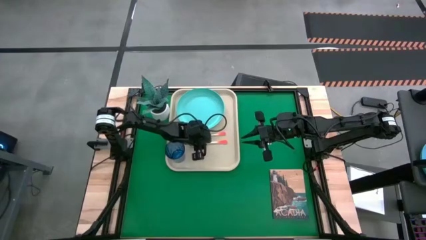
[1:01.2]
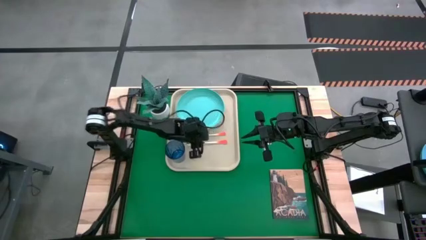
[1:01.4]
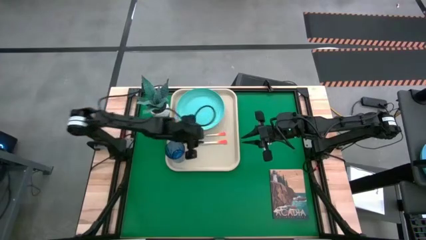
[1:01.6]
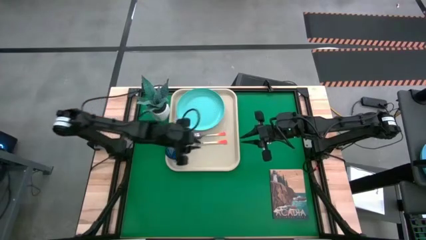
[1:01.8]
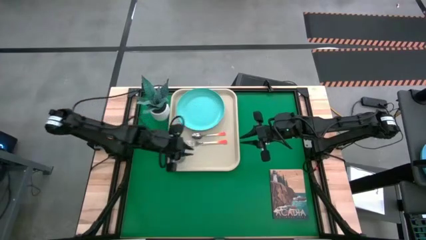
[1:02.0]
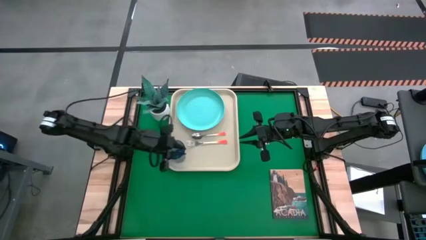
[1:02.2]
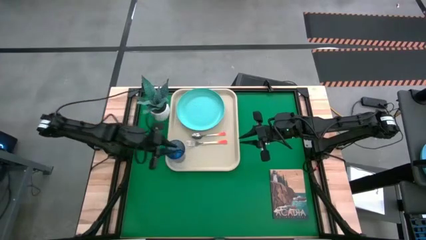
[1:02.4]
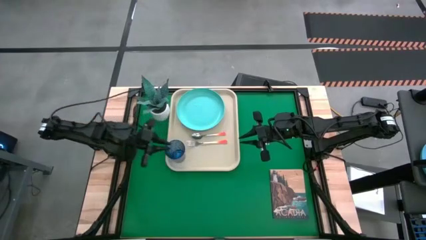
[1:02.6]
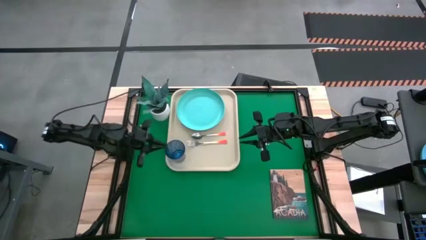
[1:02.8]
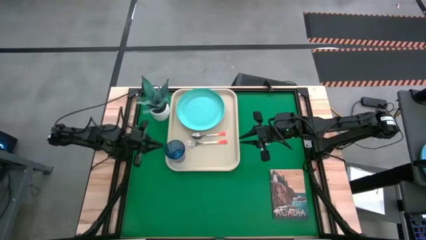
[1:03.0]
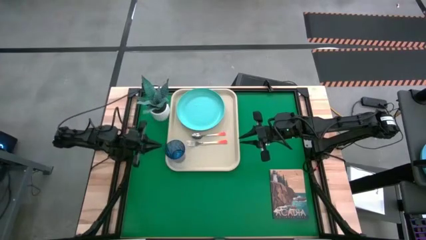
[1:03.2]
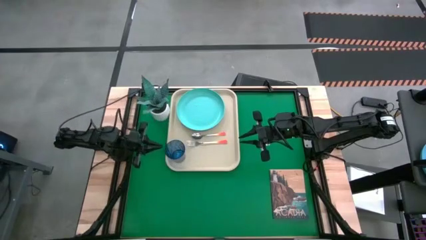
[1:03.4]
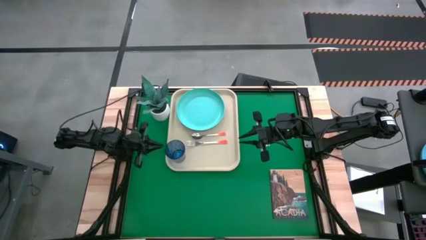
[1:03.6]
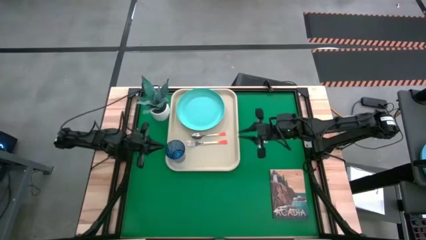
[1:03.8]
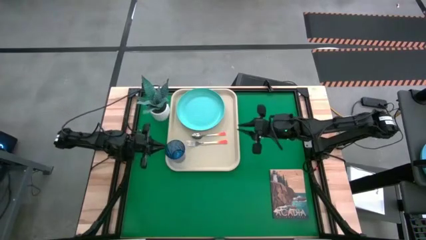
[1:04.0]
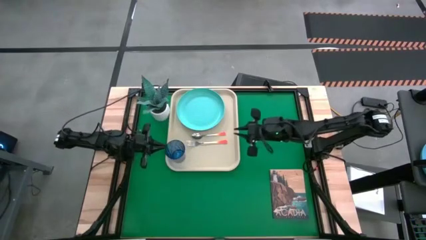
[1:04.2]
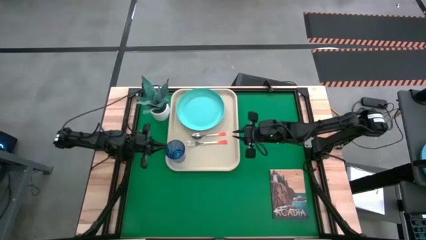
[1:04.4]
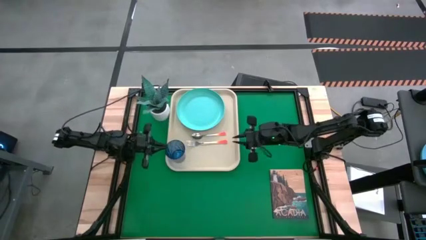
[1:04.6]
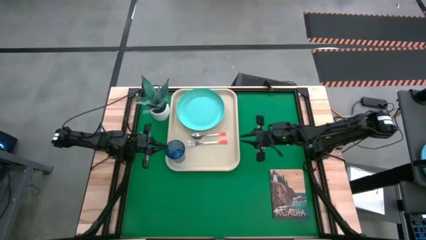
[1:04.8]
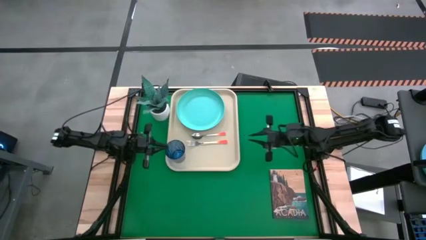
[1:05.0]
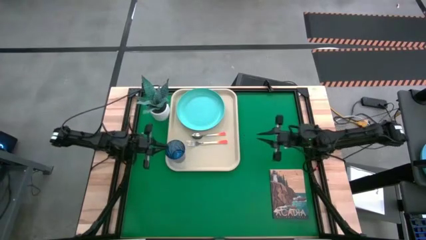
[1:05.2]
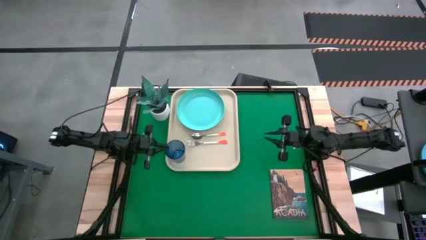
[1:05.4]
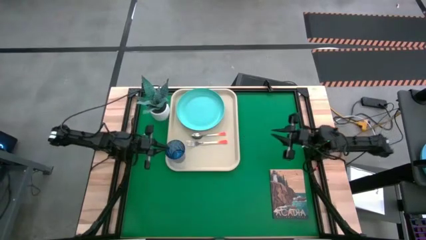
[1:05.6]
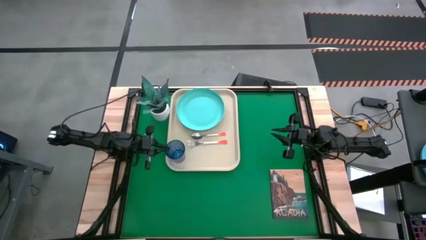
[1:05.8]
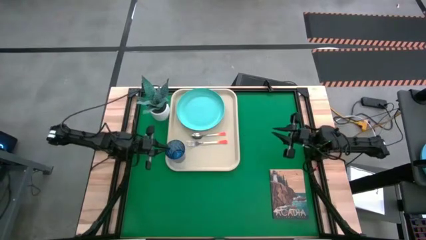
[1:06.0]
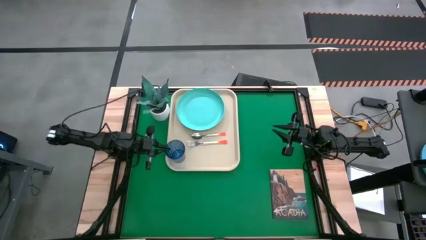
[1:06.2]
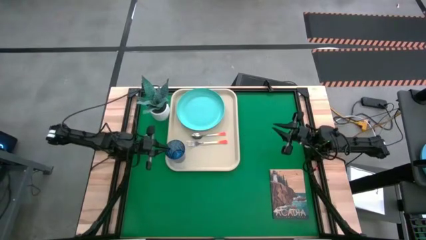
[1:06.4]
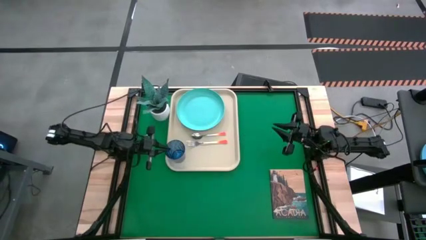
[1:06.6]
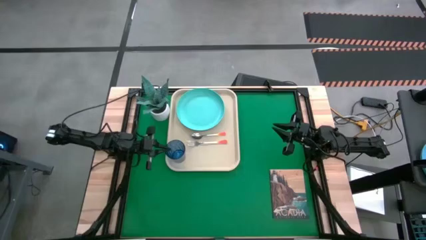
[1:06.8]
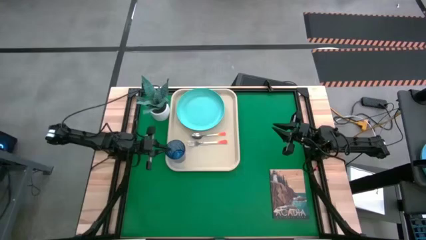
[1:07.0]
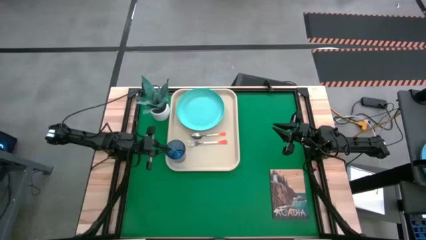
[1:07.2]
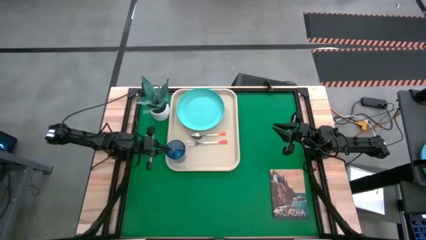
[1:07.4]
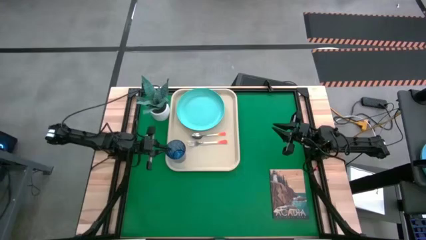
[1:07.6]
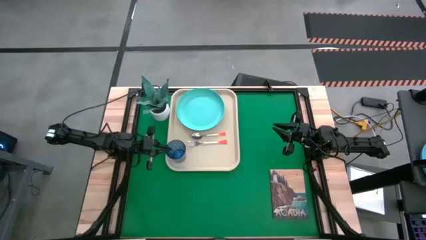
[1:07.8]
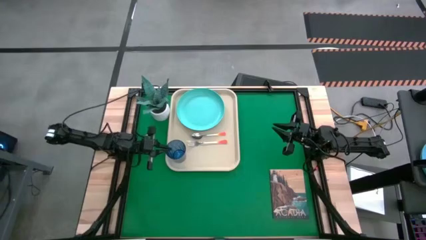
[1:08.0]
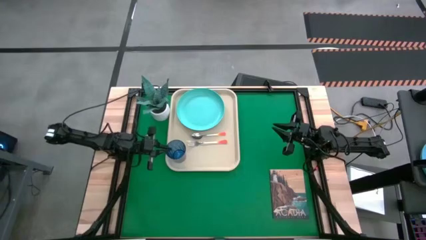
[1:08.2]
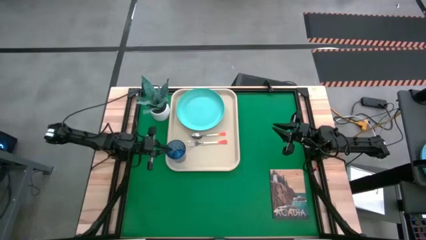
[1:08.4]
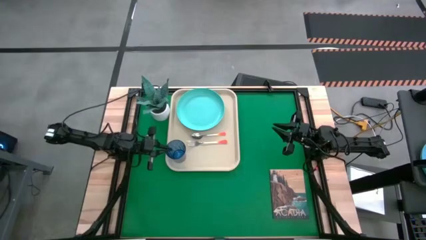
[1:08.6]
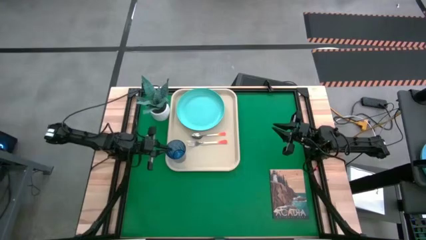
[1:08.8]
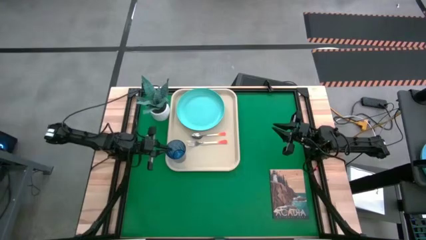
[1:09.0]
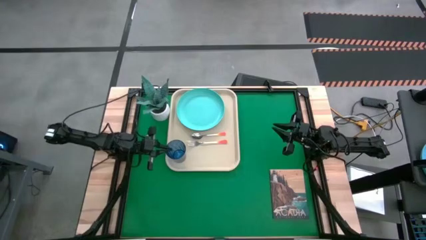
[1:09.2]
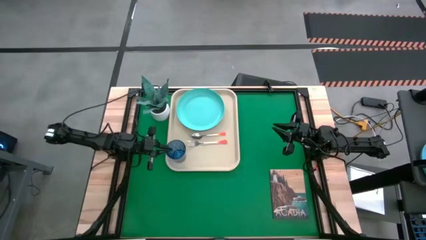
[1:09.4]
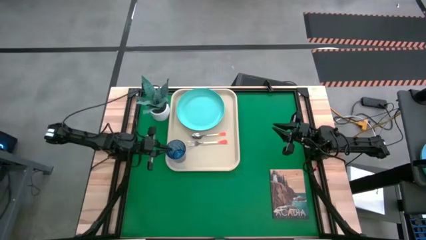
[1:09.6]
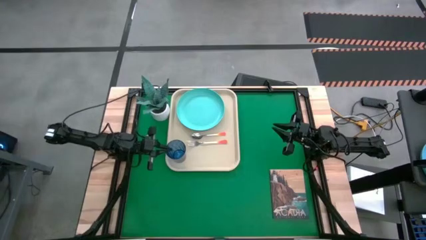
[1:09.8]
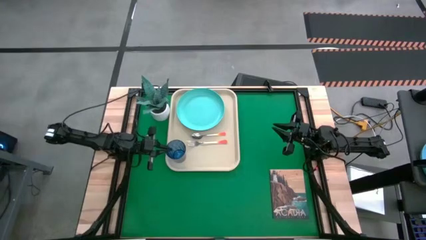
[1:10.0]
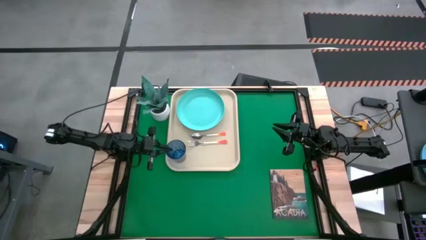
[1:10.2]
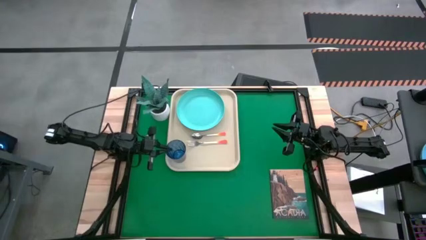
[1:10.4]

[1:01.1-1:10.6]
Task: Pick and place plate/cup/fork/spoon on tray
Return to Home Position

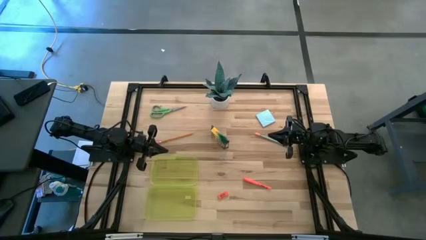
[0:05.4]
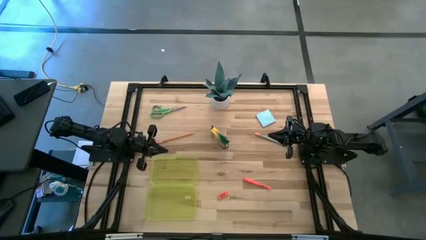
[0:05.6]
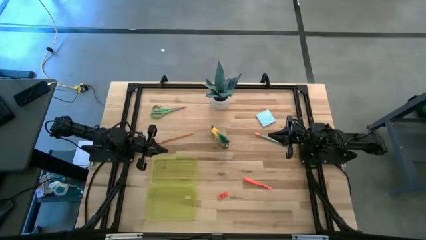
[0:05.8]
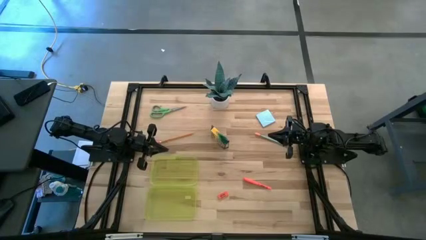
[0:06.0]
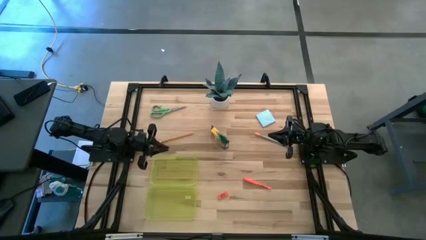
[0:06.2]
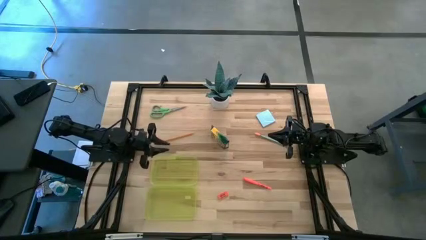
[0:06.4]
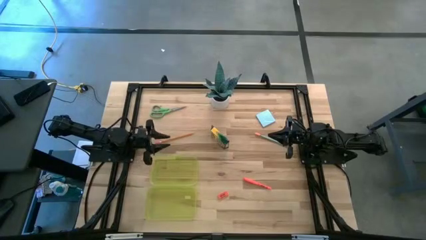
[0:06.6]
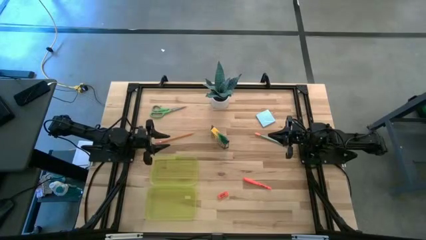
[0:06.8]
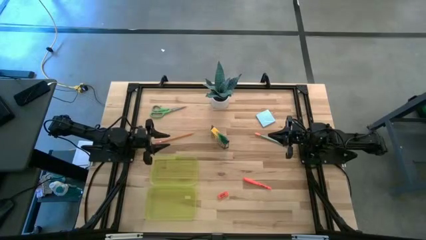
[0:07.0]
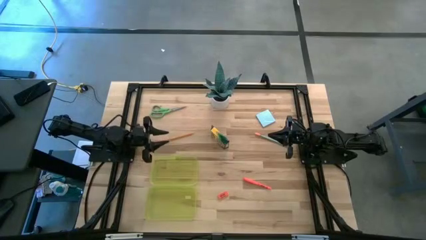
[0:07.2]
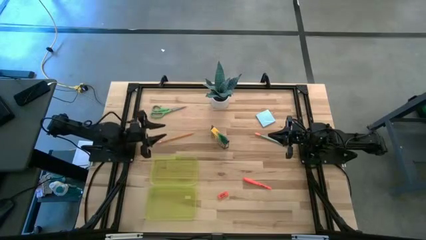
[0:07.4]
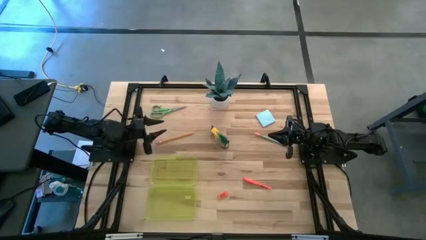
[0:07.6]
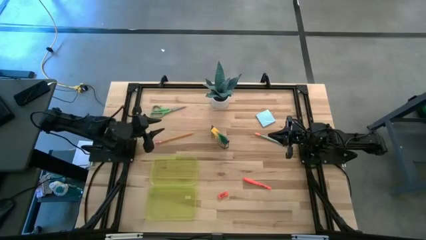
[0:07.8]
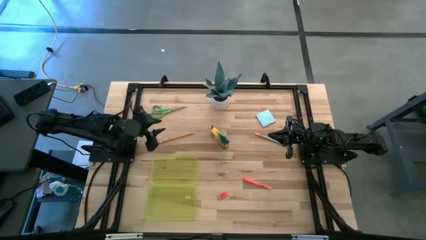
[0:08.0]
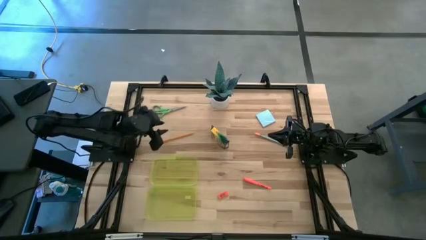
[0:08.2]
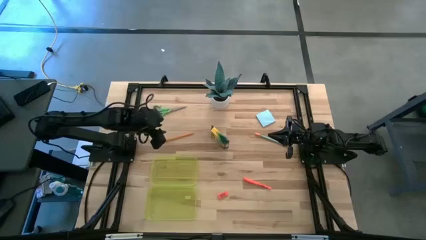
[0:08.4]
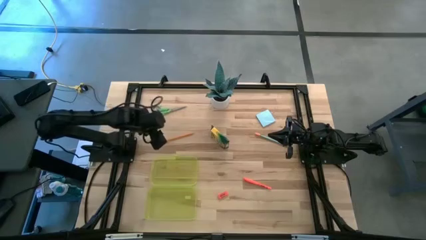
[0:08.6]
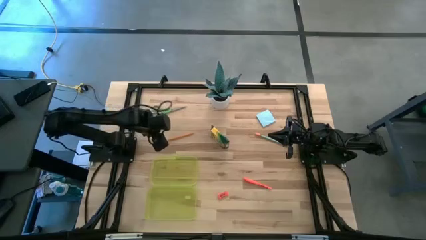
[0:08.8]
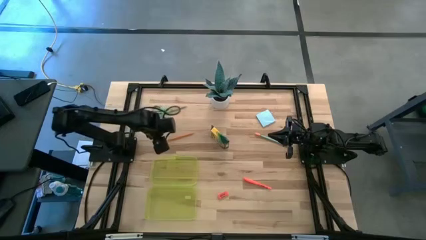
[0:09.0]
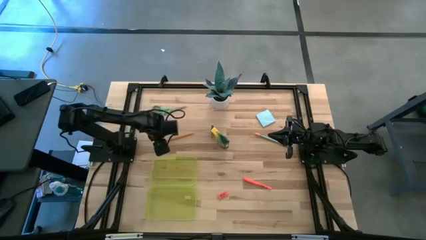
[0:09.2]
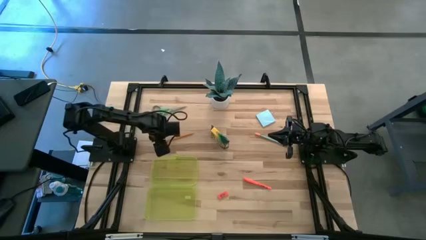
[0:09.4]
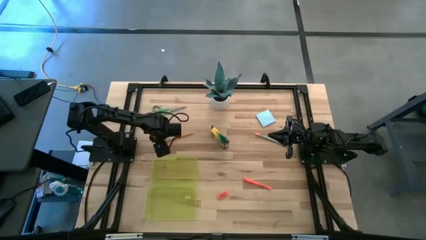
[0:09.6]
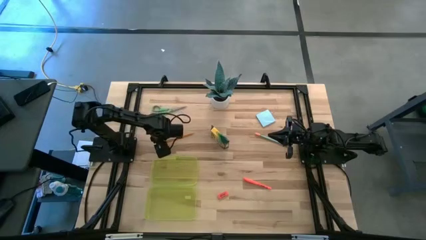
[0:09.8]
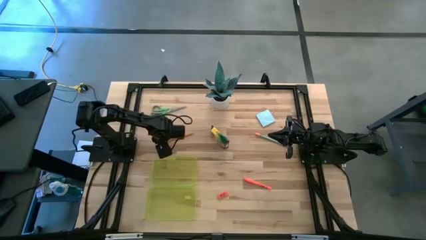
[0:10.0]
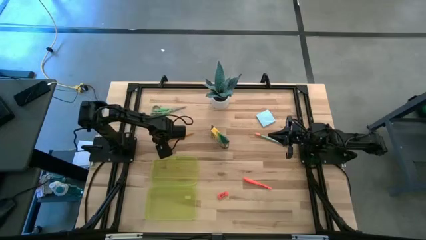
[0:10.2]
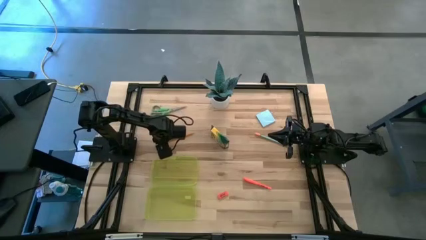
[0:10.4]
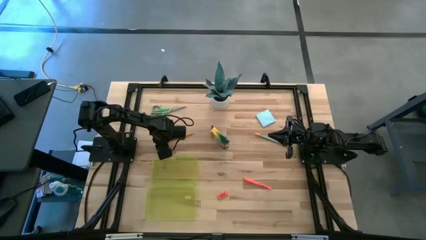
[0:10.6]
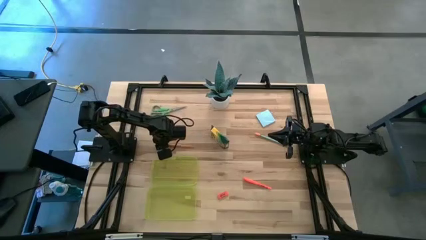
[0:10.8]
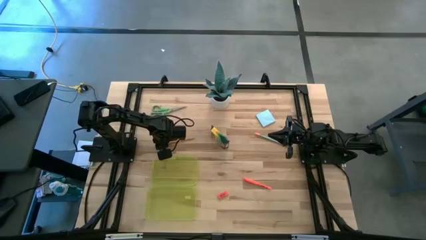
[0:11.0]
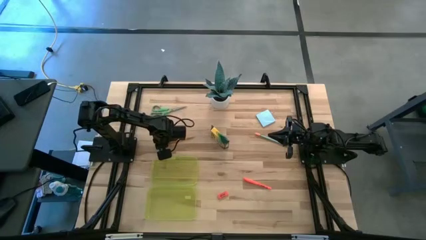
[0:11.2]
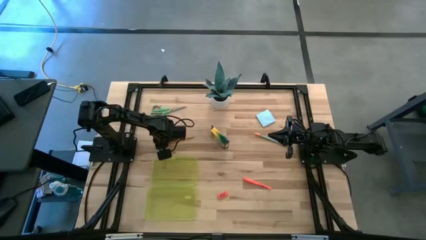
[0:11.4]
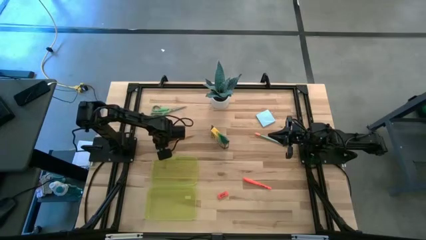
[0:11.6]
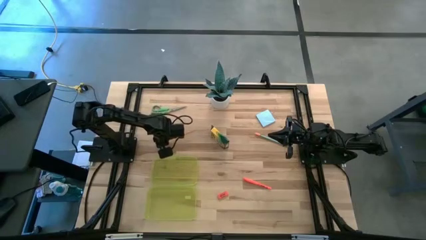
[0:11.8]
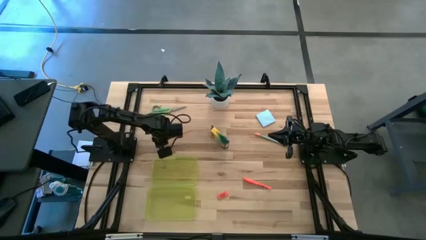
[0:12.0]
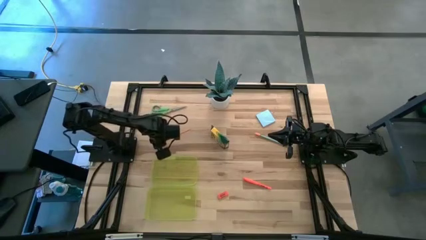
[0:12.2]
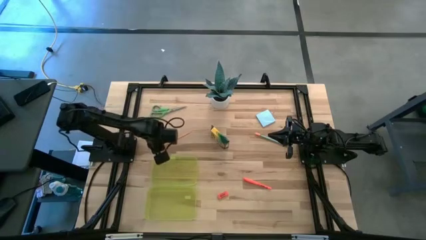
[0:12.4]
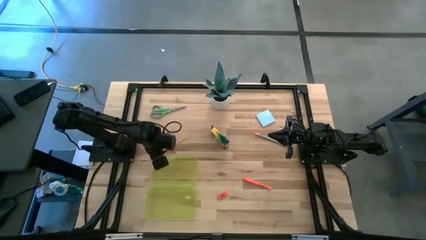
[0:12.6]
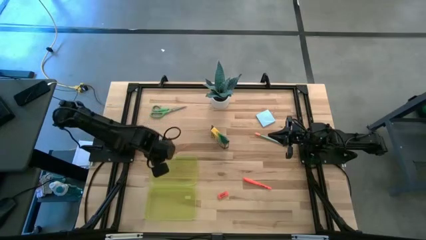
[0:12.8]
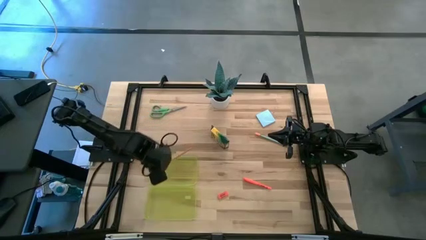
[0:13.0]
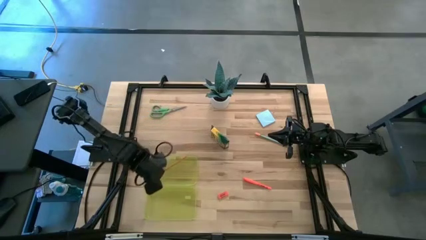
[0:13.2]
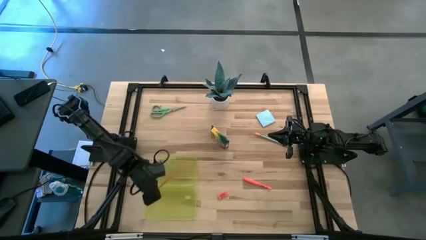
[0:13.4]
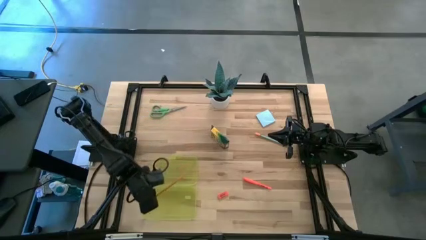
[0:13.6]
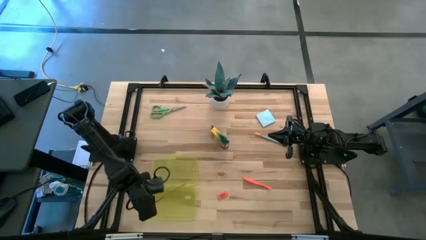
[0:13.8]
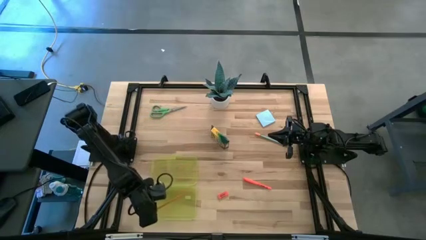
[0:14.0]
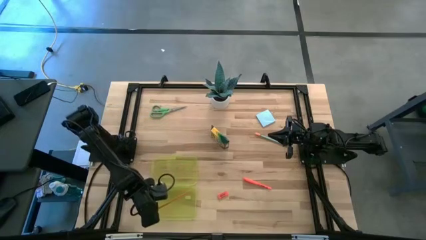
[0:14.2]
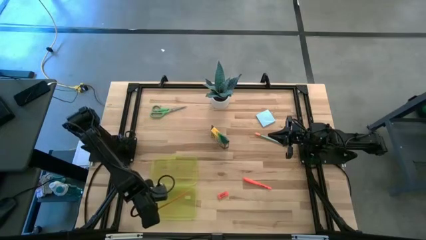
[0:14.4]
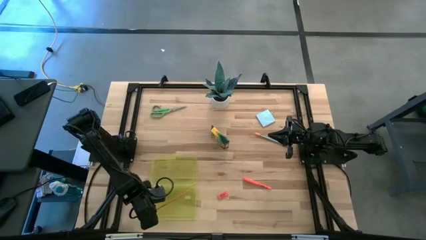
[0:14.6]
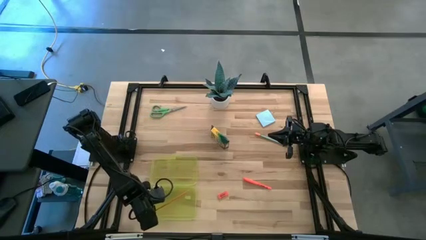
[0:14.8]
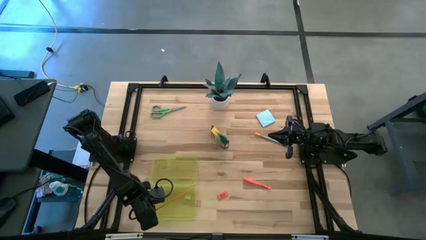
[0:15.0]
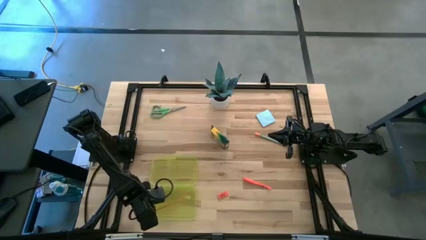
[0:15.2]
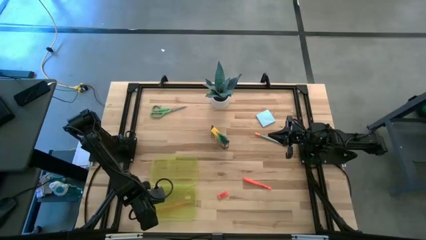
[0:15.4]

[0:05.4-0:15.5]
Task: Pack school essentials
Put the orange pencil into the yellow supply box
